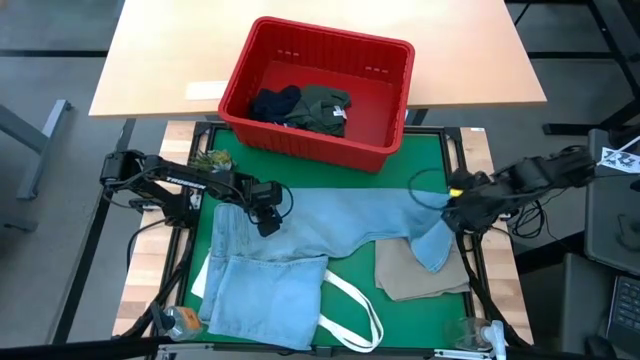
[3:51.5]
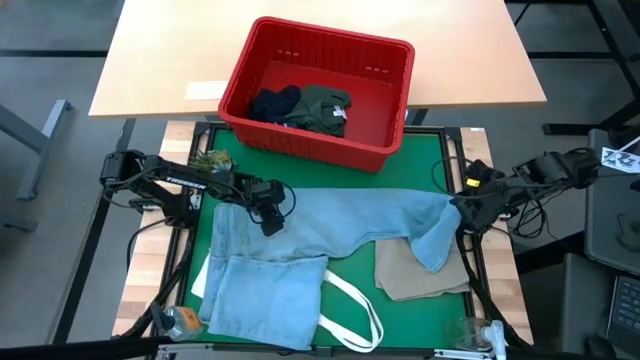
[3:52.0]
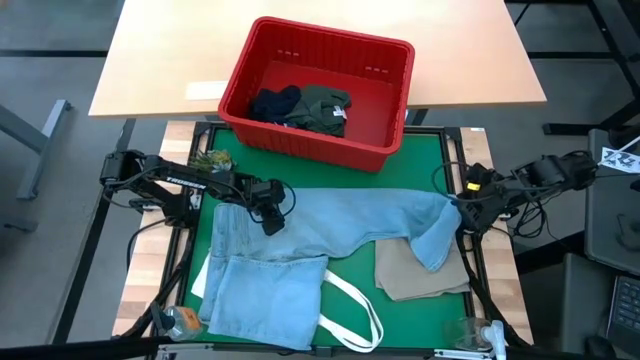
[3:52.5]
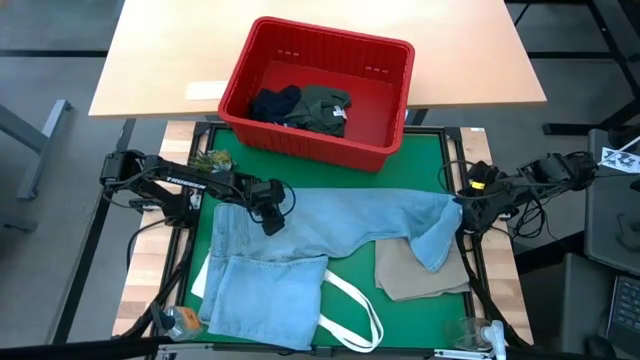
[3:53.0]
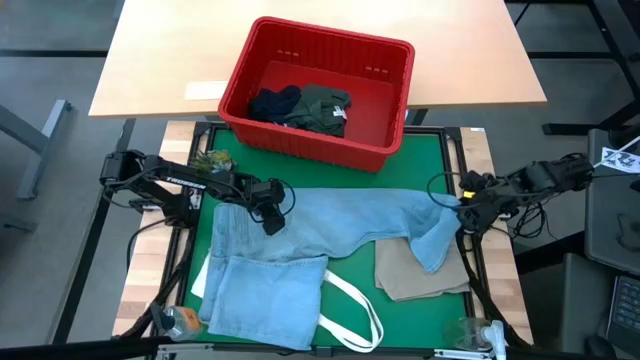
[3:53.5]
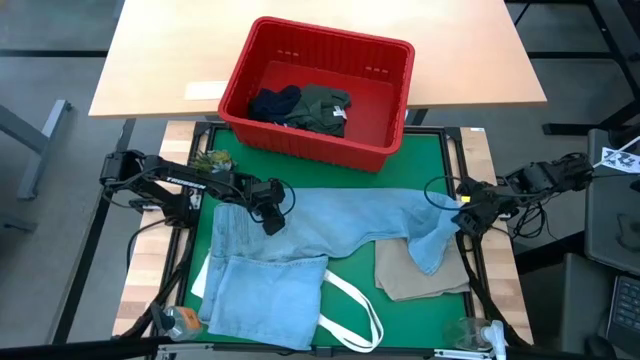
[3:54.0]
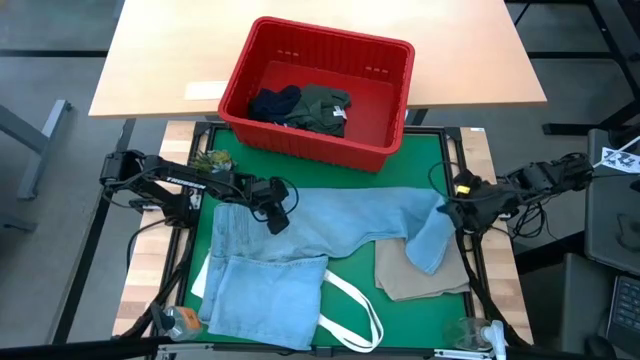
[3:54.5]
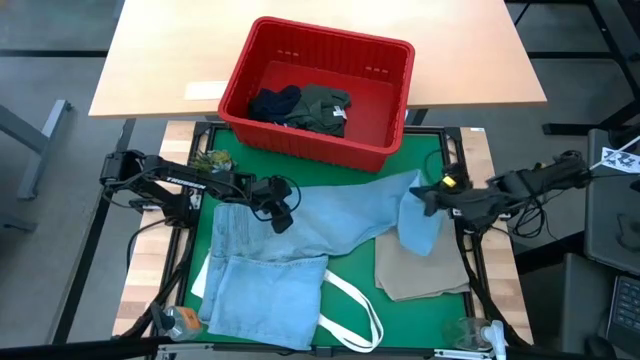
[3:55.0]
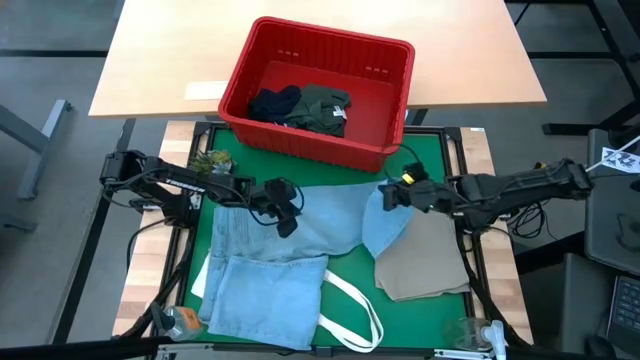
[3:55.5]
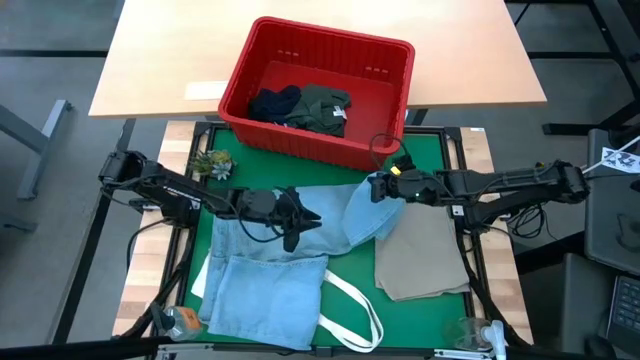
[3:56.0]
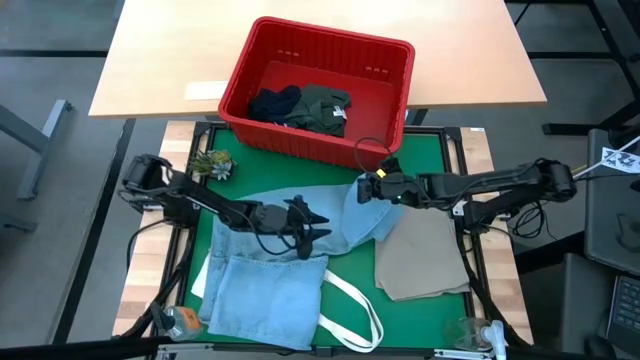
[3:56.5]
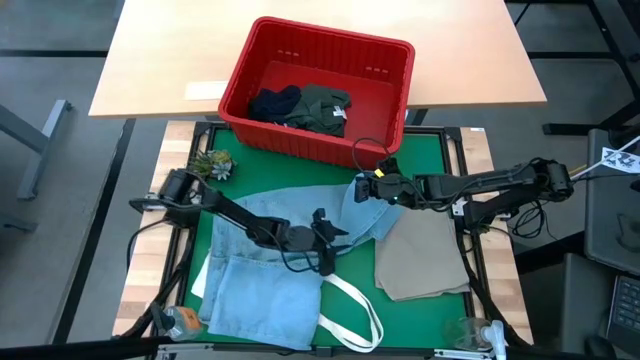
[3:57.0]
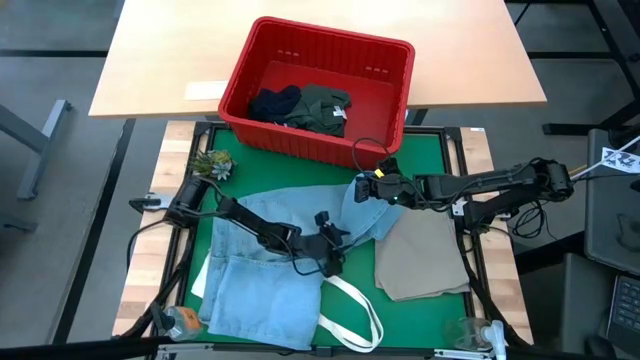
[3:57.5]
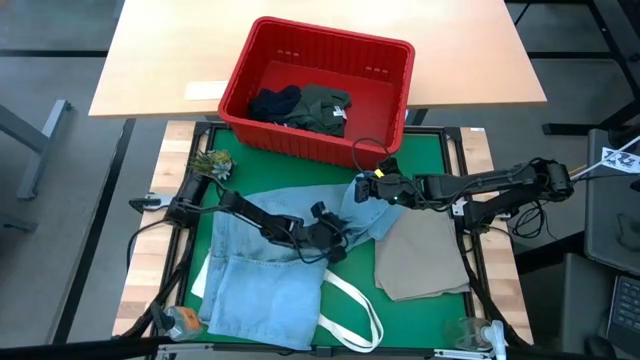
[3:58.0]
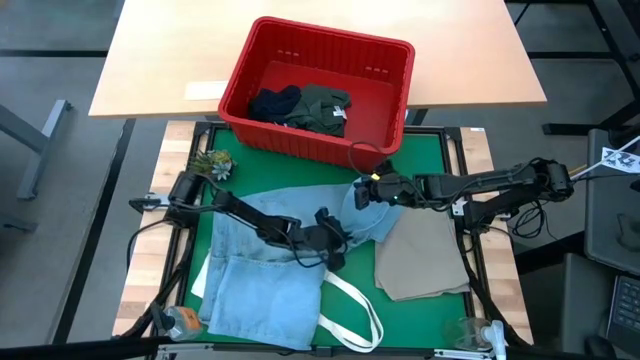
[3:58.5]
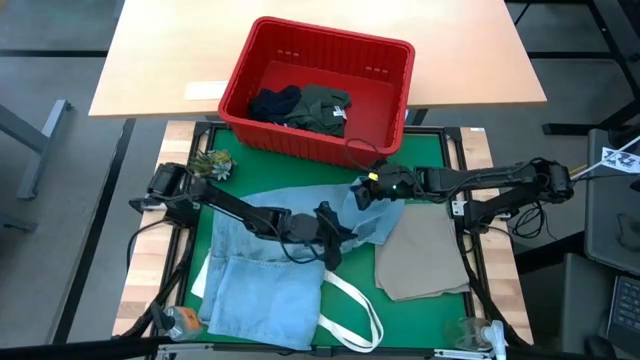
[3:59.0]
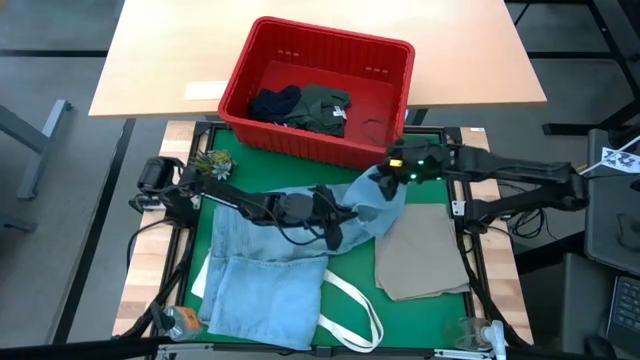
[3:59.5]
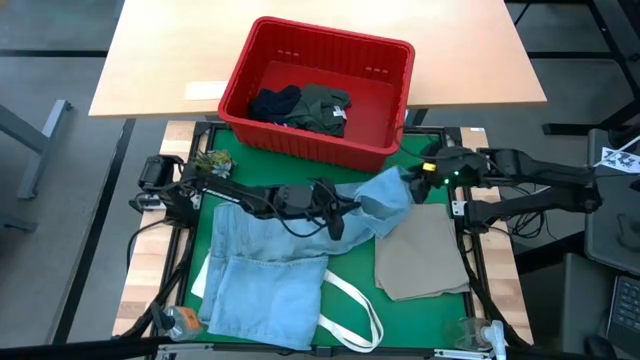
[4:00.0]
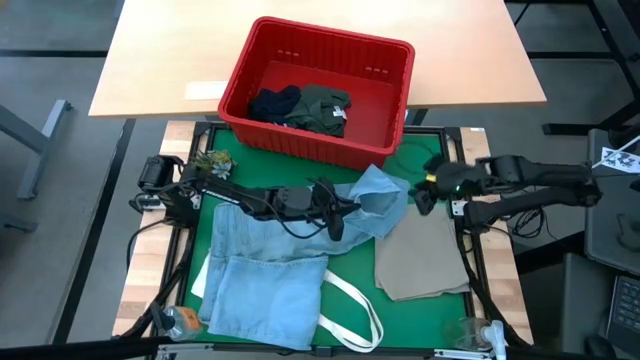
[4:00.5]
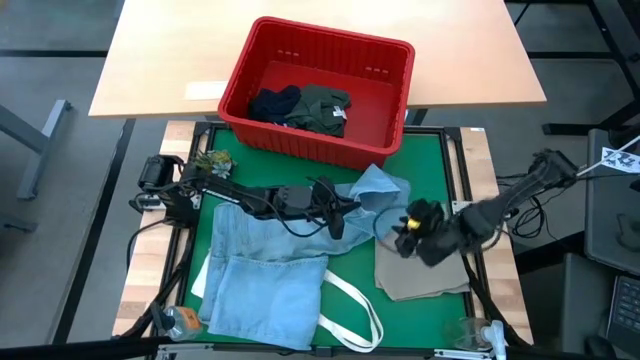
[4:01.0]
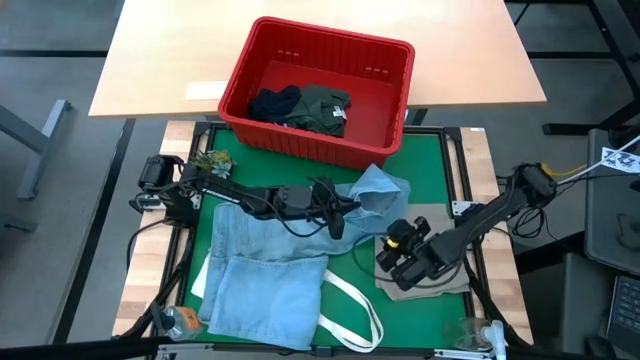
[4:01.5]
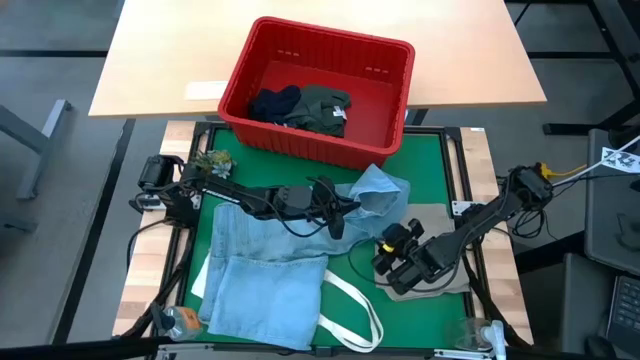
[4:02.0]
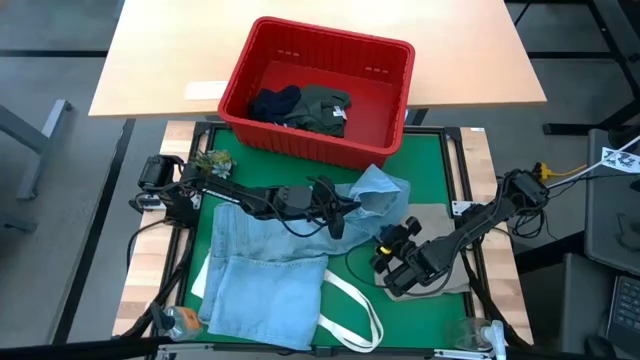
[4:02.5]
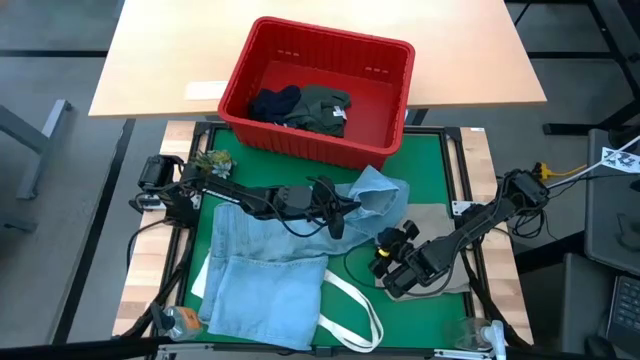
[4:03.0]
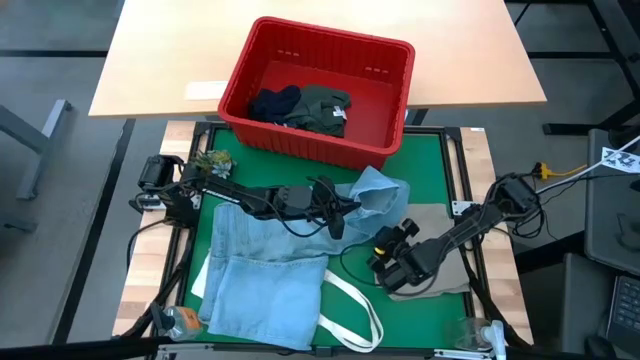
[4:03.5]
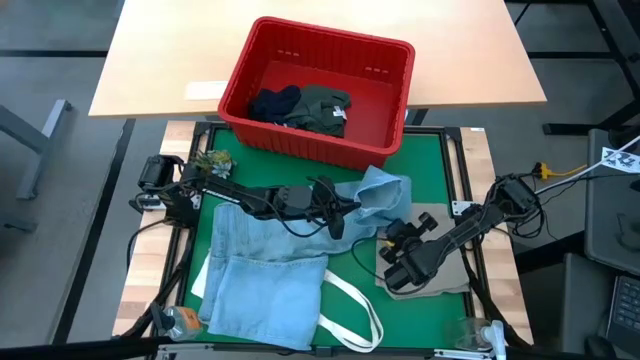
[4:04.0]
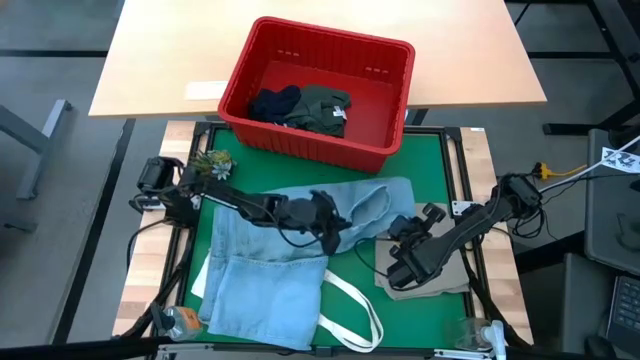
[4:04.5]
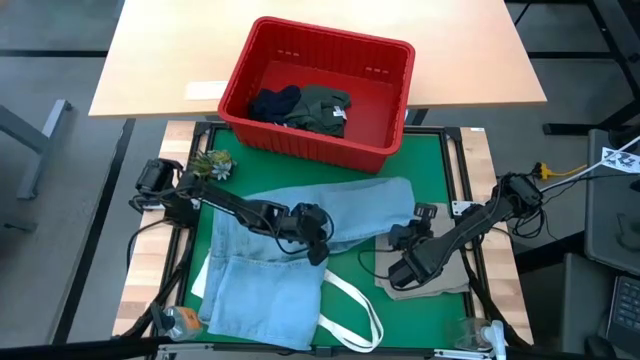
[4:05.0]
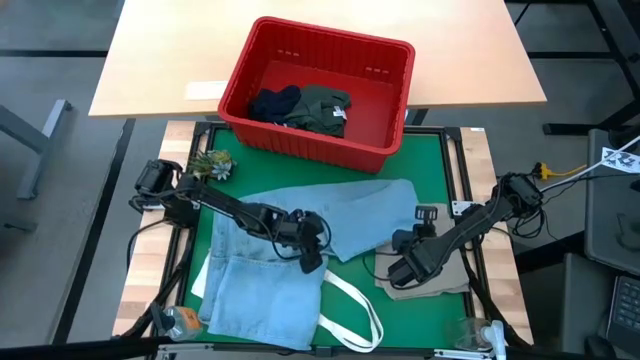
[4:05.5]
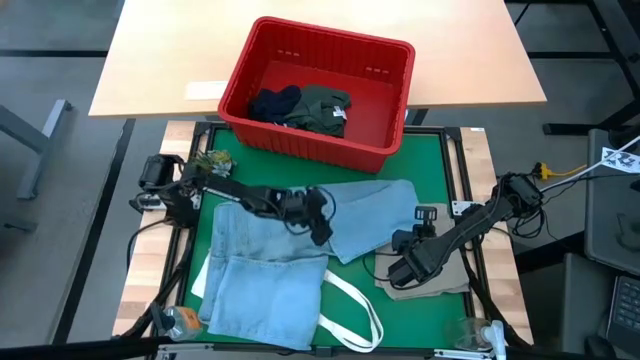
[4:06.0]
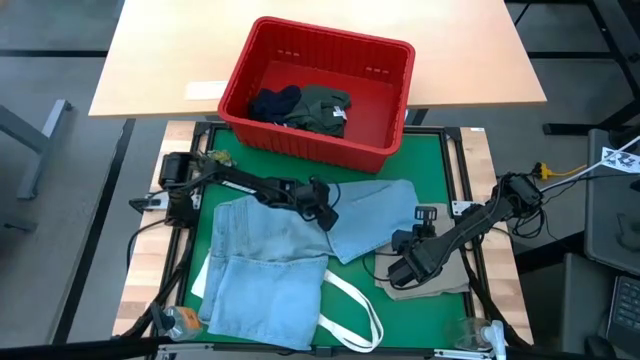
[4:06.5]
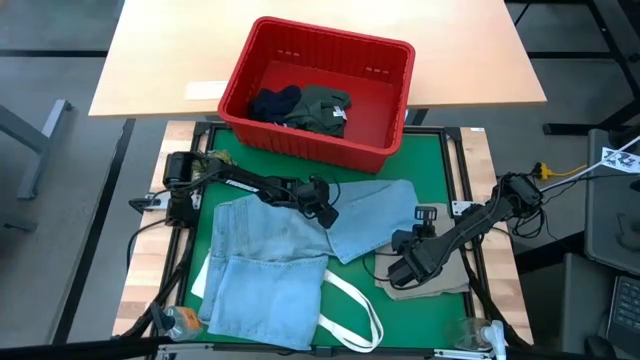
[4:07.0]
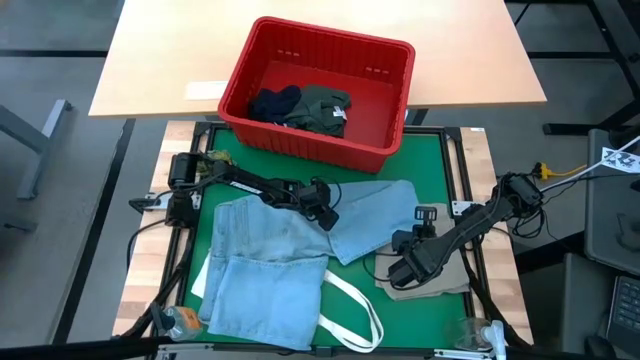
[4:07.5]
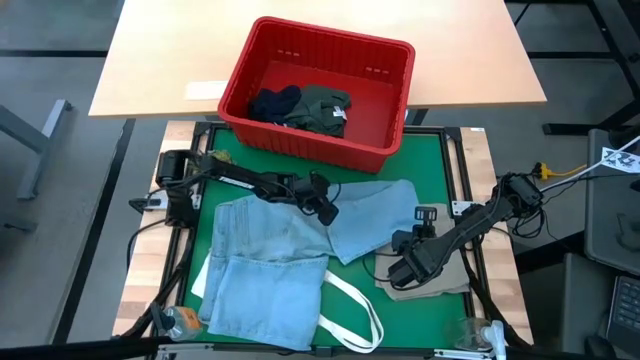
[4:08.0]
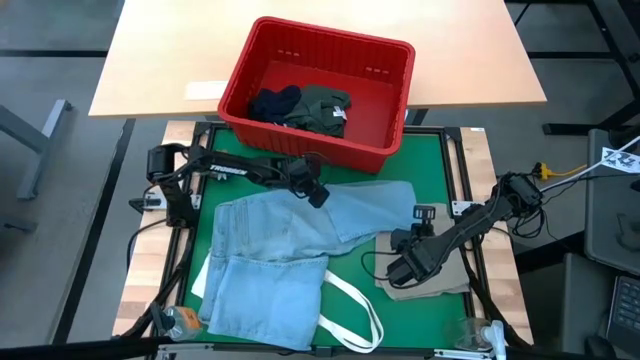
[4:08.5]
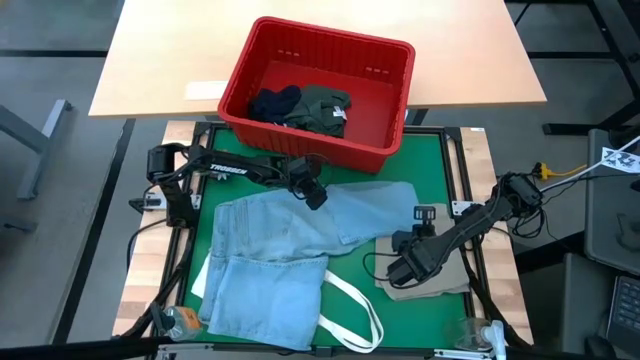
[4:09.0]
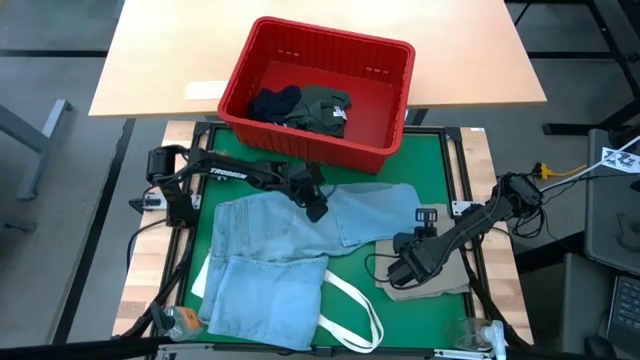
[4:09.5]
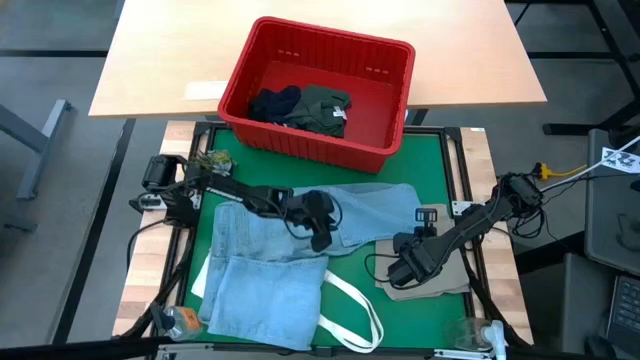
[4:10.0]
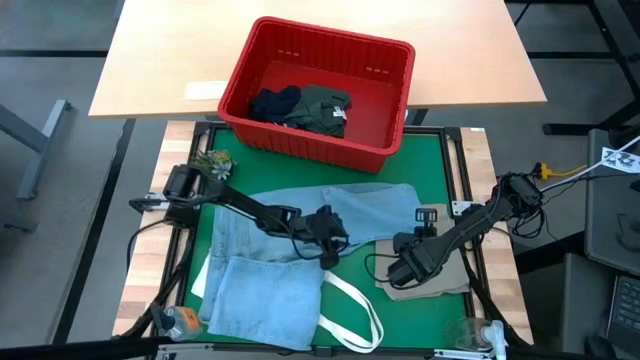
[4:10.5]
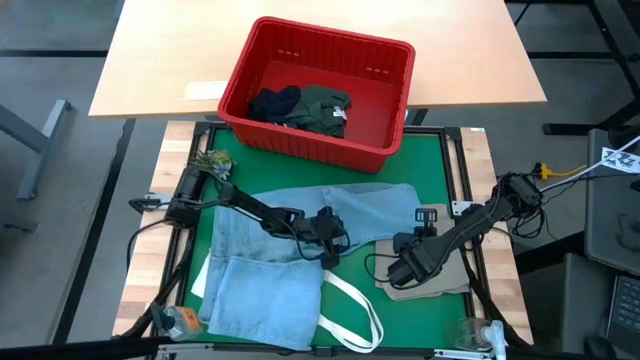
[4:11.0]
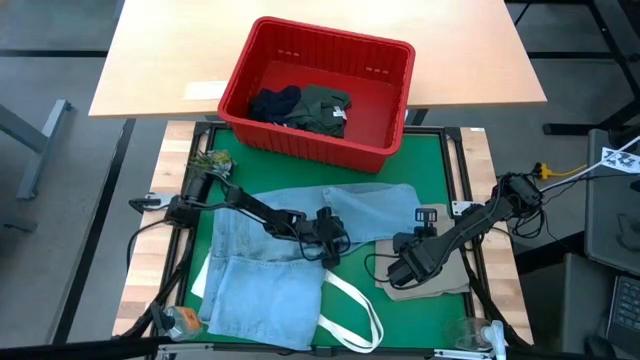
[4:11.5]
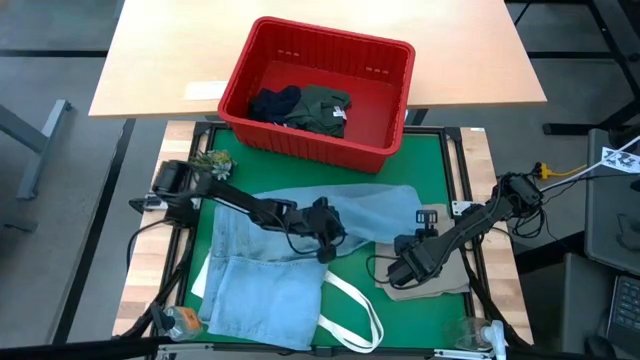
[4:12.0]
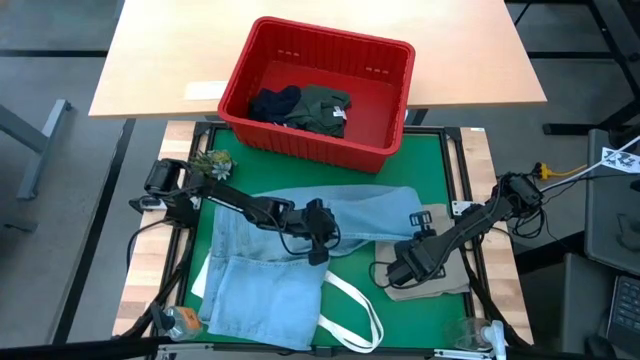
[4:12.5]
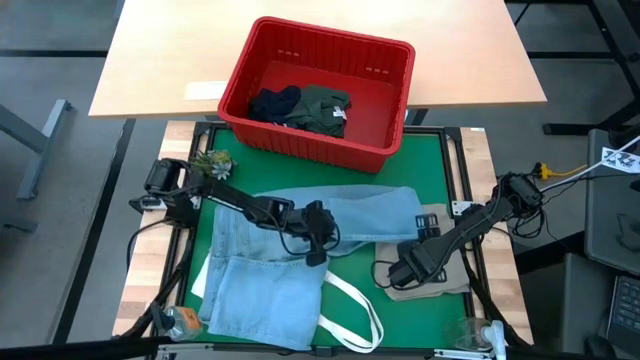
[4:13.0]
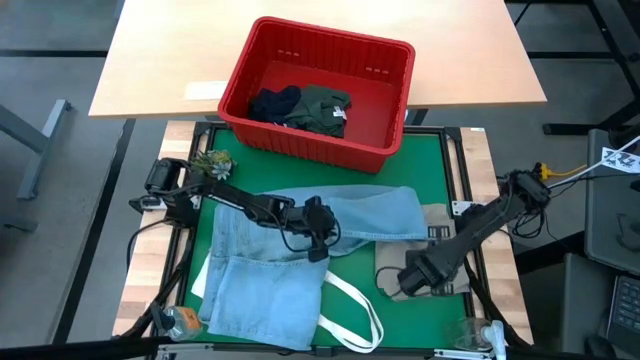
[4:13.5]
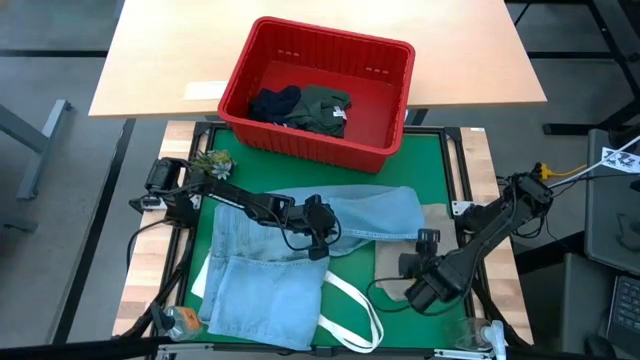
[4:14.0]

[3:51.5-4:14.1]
Task: Fold Laundry from Bin
Fold the light blue pants
